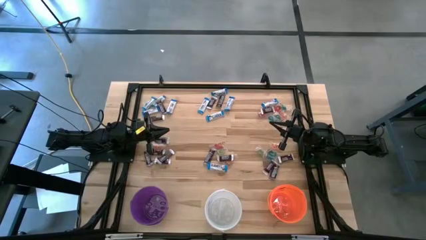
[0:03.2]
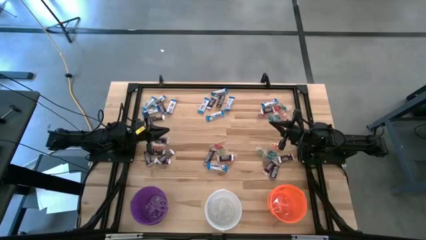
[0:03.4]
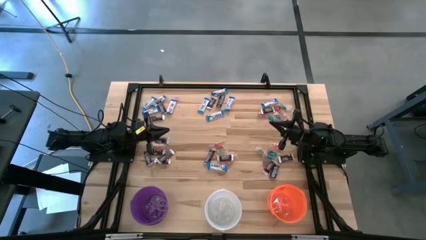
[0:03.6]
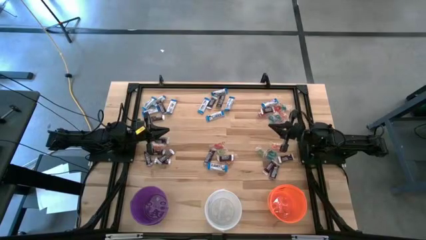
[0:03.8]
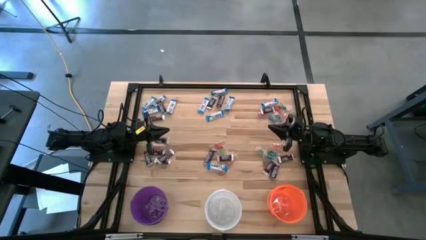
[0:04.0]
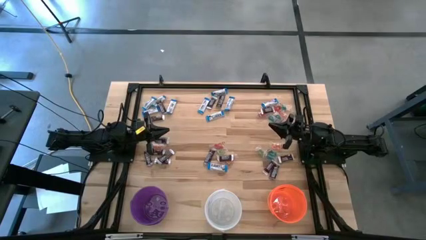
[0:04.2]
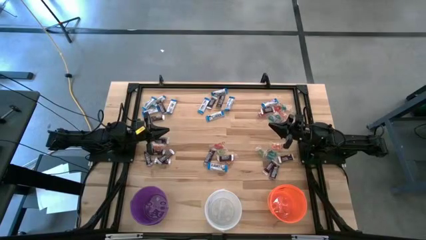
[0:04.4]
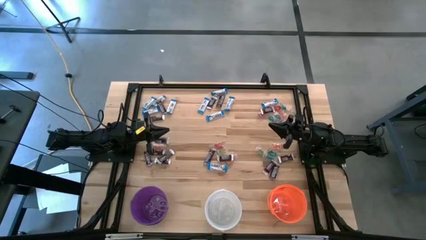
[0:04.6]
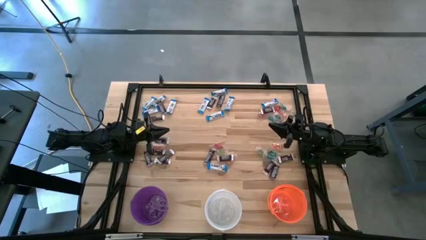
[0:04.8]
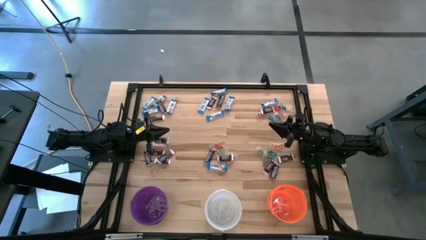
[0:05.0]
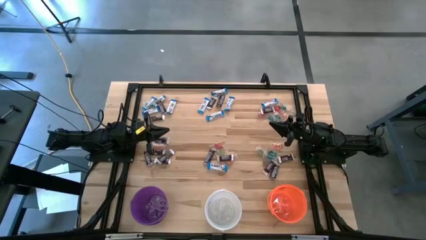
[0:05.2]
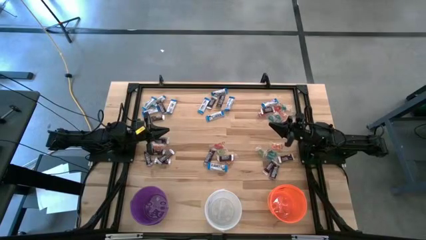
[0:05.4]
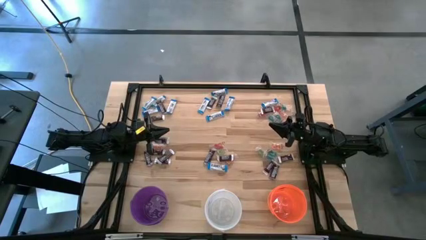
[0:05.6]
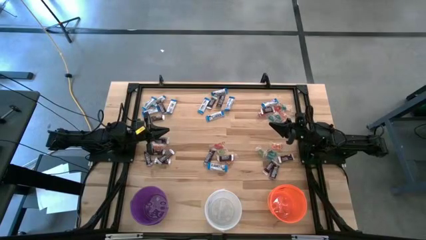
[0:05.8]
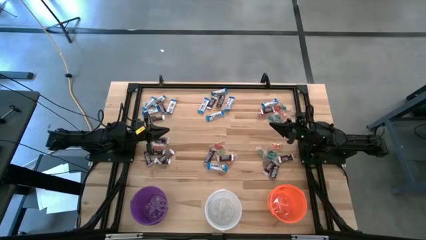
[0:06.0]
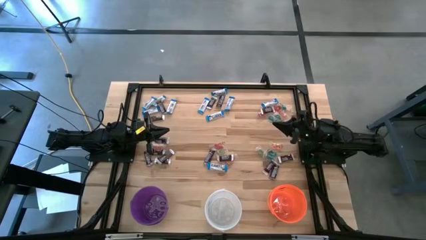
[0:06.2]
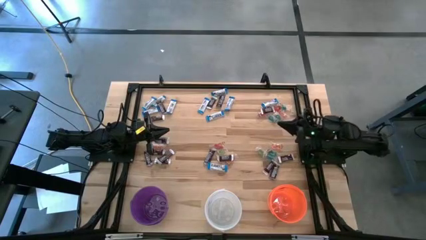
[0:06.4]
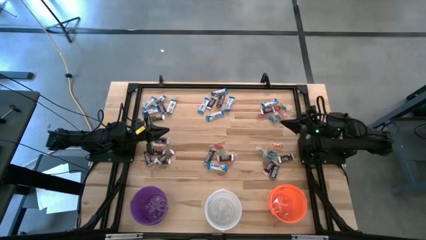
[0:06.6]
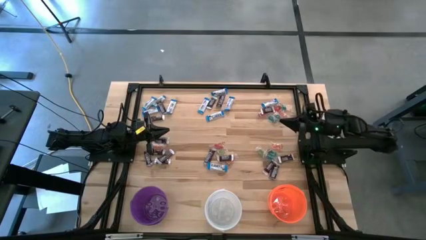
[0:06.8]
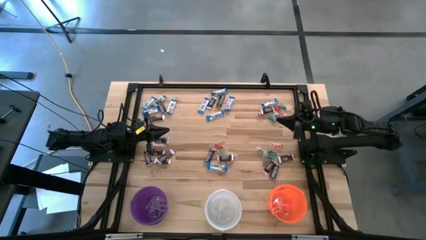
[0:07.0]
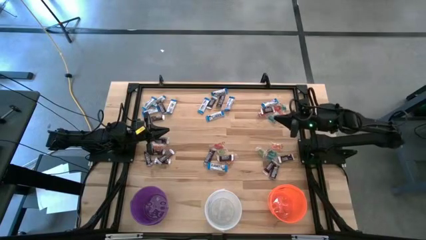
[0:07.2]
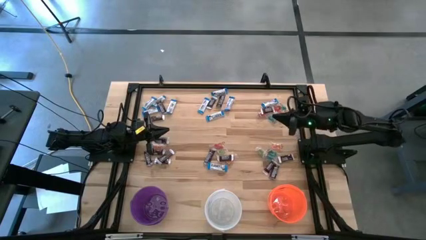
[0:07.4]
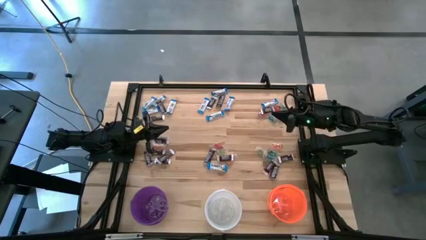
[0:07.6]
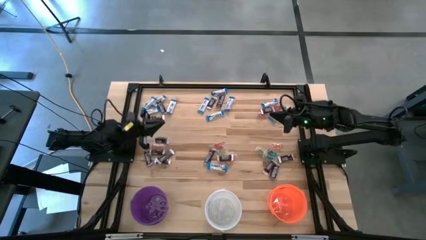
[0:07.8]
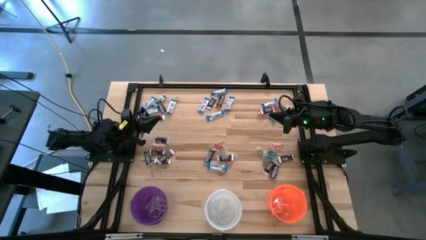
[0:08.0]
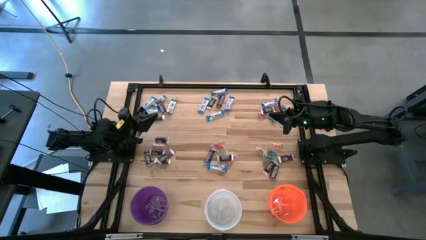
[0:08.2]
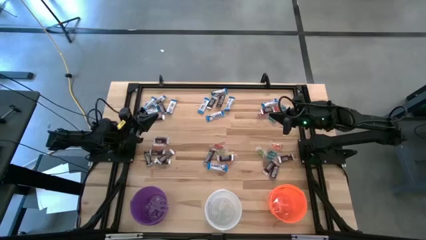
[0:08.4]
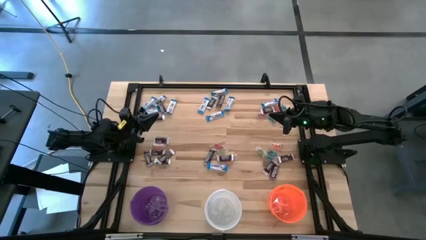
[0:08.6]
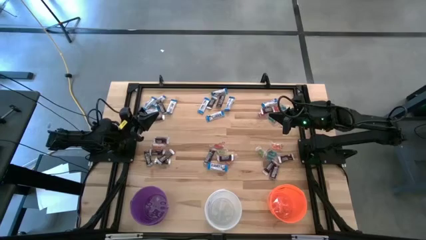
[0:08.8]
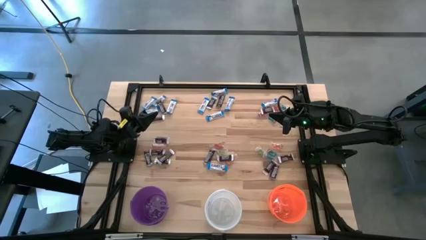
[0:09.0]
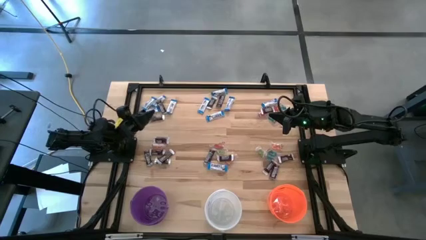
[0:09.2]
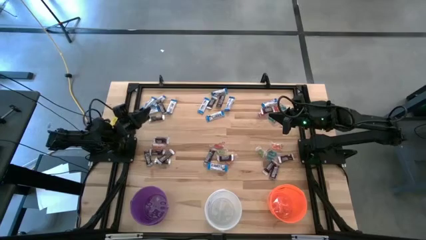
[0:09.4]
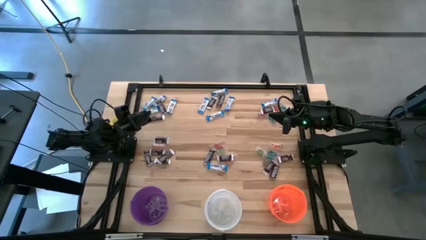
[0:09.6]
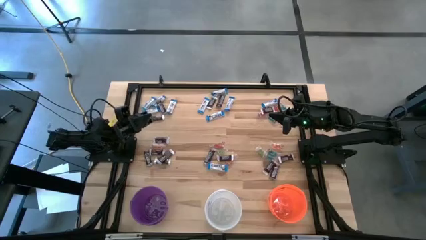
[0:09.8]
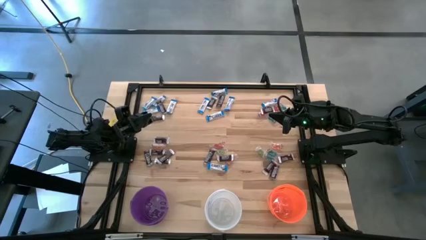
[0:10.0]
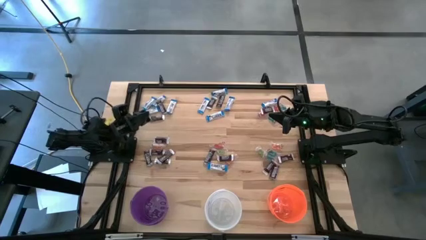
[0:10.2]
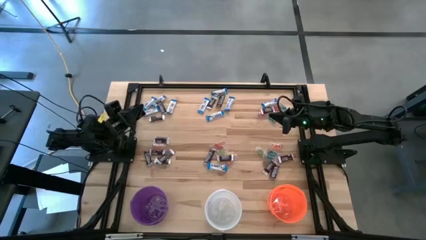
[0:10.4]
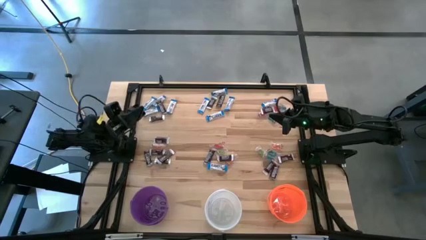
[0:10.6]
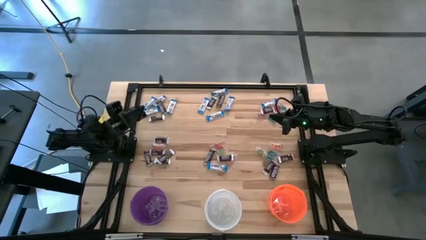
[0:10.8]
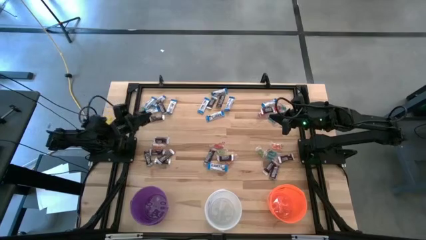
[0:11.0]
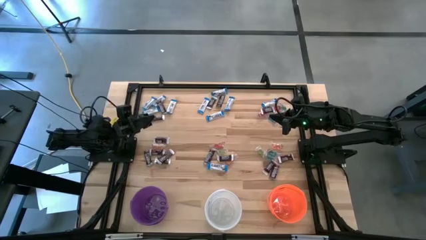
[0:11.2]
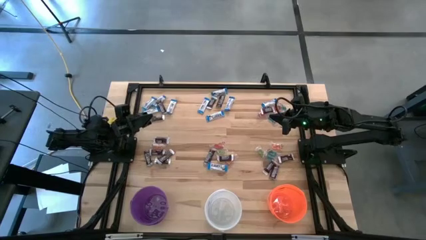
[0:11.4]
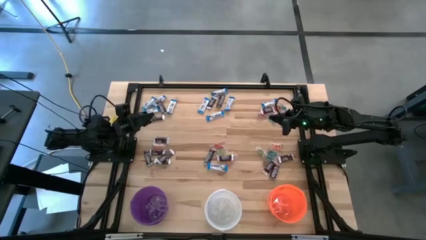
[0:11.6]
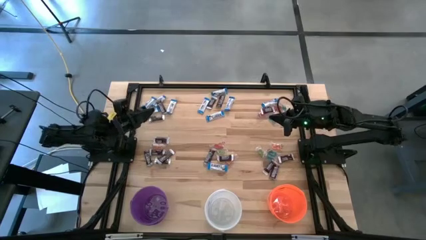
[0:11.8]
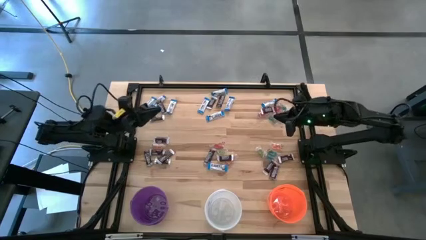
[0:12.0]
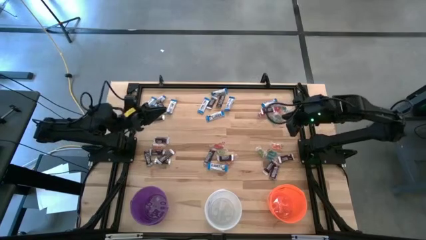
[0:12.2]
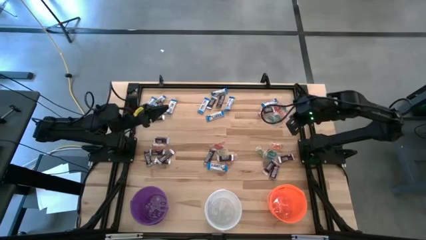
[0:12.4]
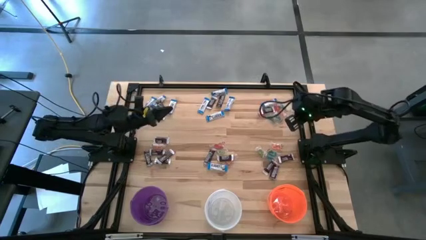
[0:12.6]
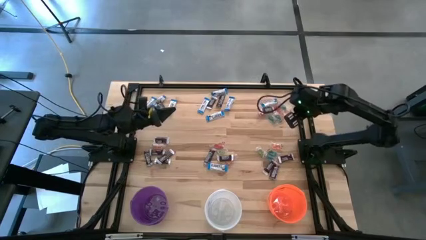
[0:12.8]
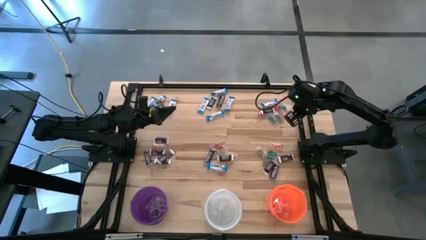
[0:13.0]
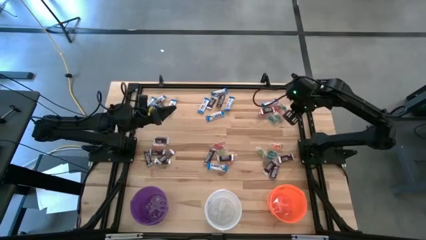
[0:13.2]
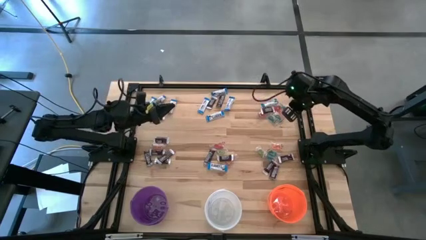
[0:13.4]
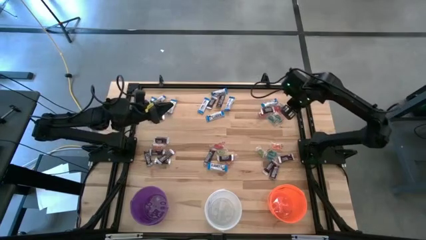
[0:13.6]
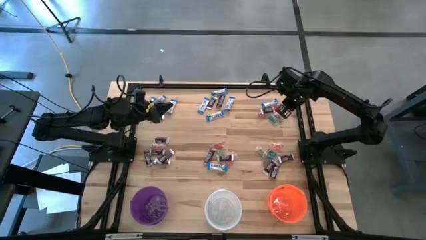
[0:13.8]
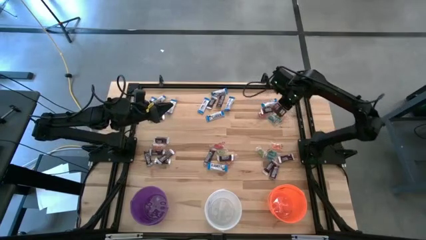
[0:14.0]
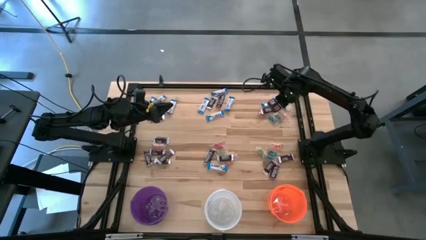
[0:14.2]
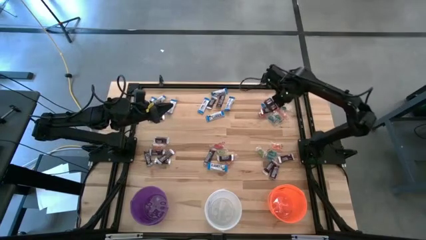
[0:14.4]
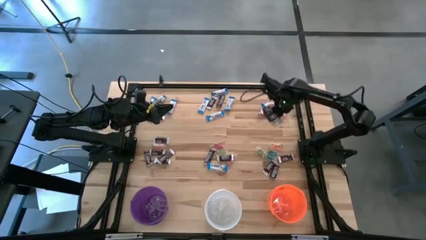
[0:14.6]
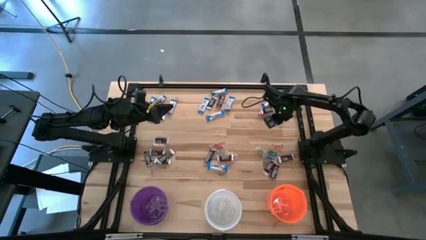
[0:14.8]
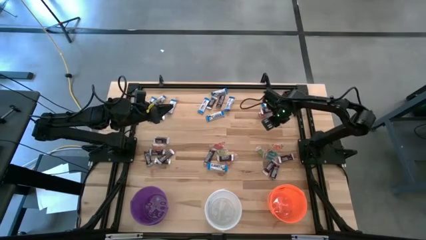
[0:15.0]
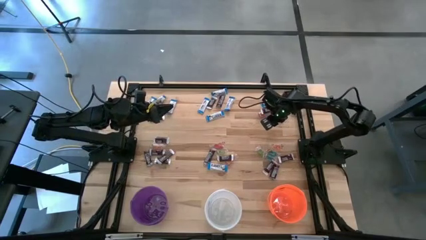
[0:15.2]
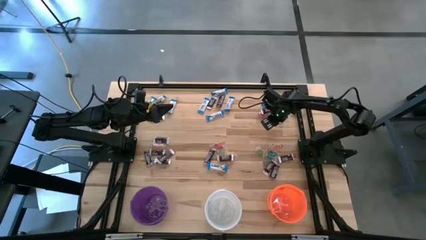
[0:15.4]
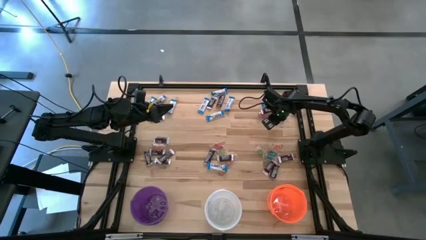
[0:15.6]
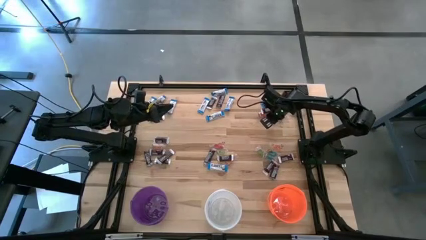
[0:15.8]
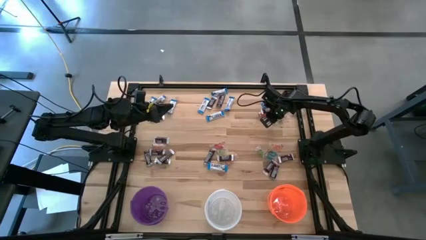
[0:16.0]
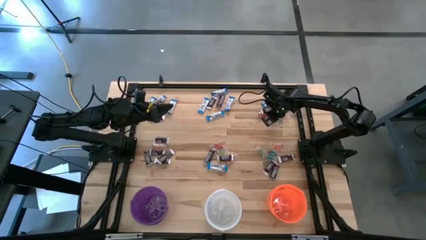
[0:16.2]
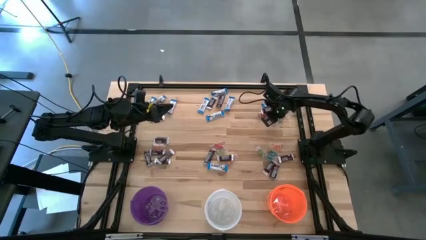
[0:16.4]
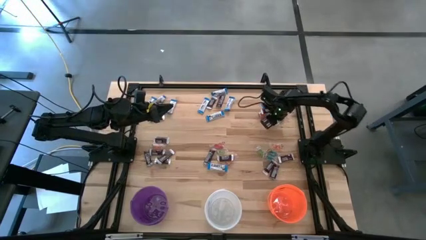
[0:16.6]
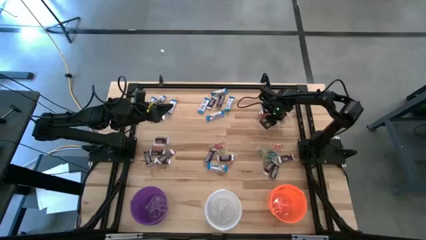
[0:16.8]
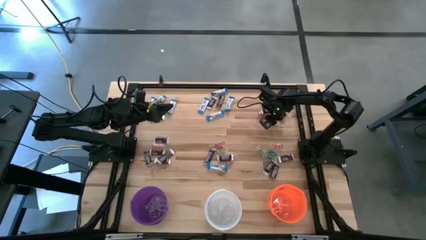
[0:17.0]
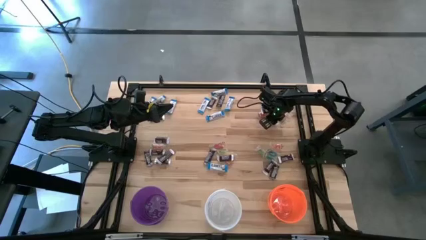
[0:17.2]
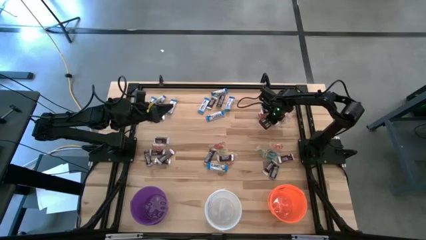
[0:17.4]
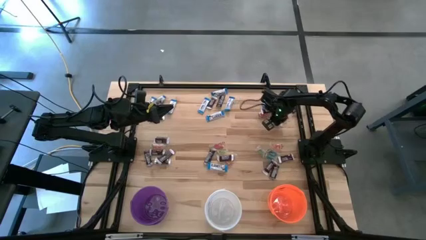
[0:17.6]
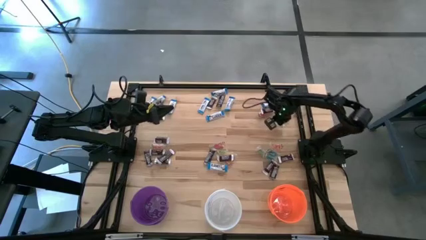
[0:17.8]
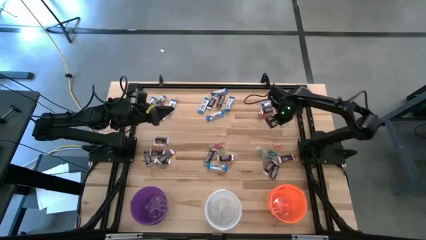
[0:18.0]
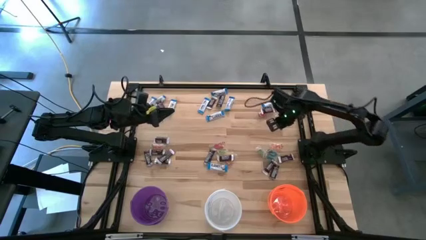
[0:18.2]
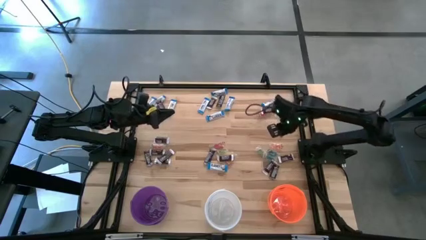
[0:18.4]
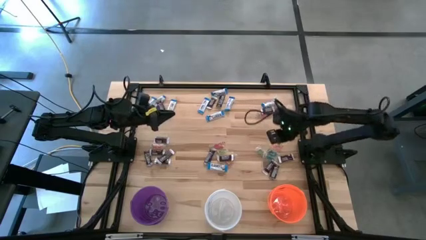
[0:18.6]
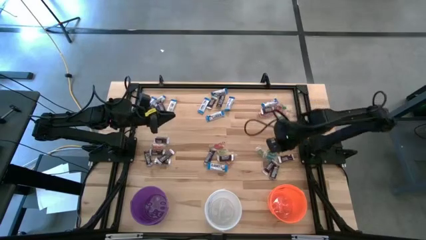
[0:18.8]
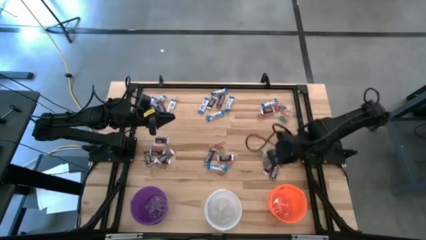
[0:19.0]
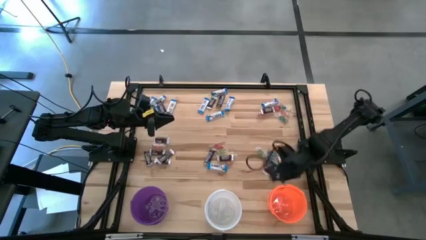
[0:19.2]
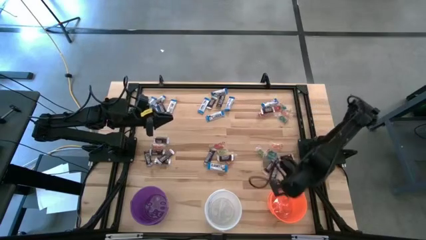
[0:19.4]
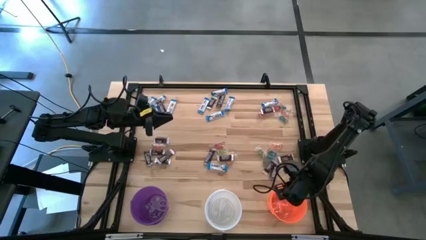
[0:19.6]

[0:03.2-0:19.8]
Task: Sort candy
Put the blue gummy into the orange bucket
